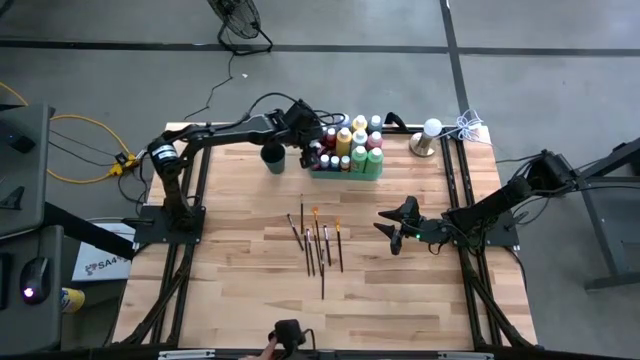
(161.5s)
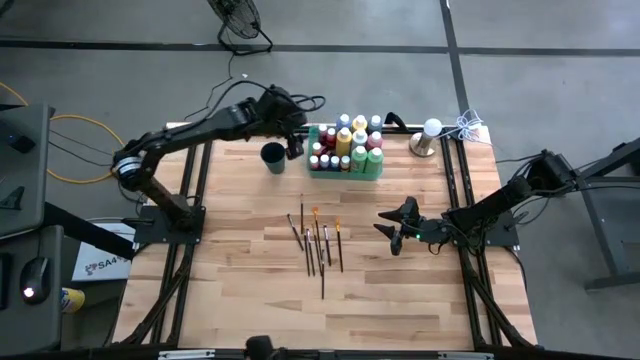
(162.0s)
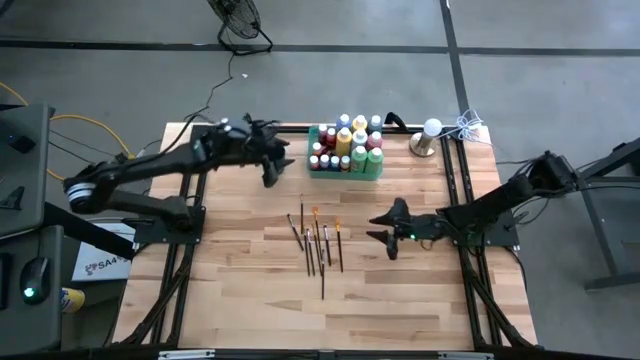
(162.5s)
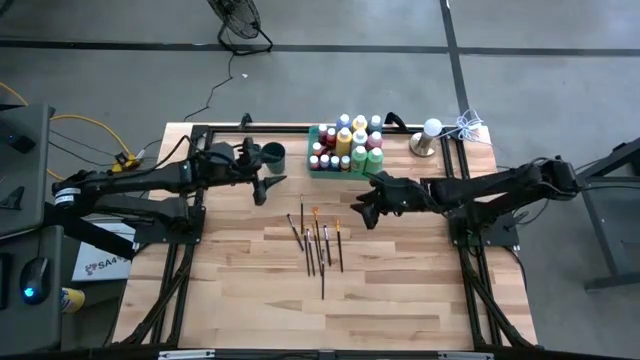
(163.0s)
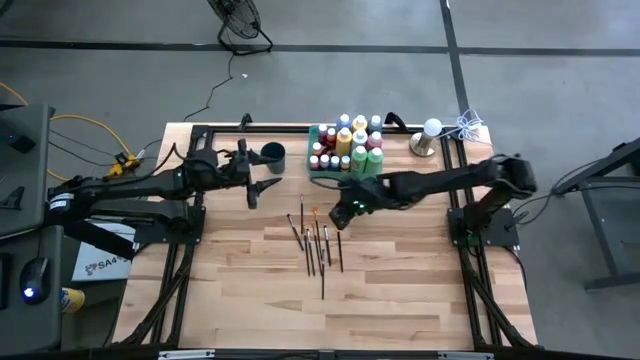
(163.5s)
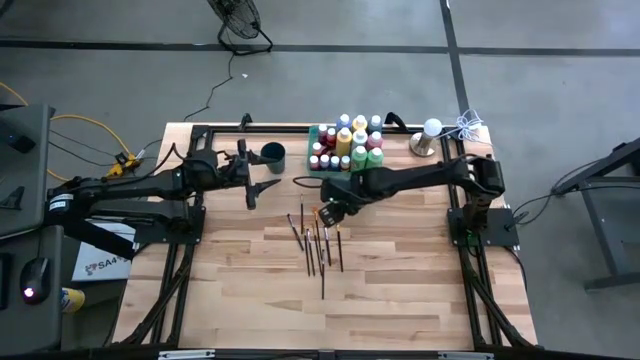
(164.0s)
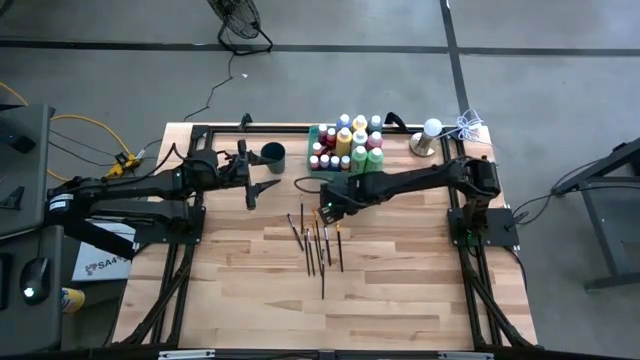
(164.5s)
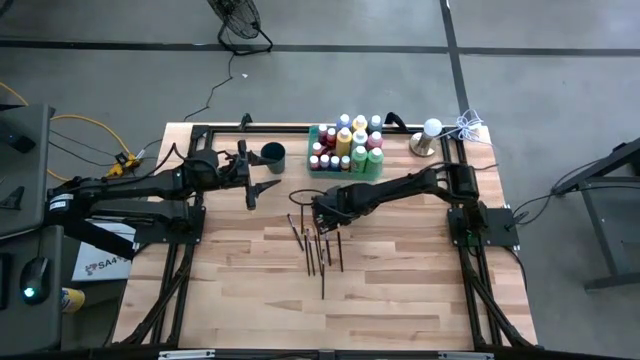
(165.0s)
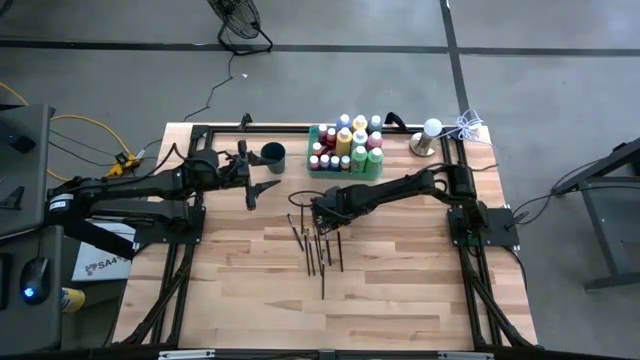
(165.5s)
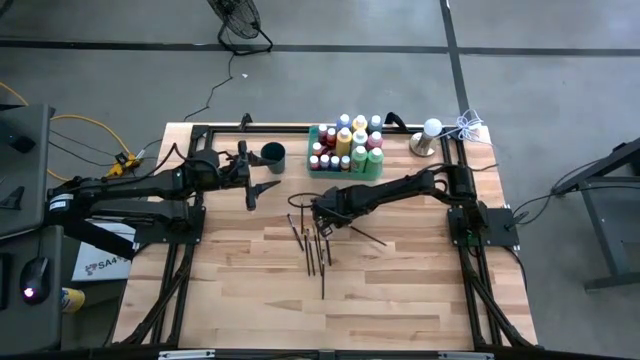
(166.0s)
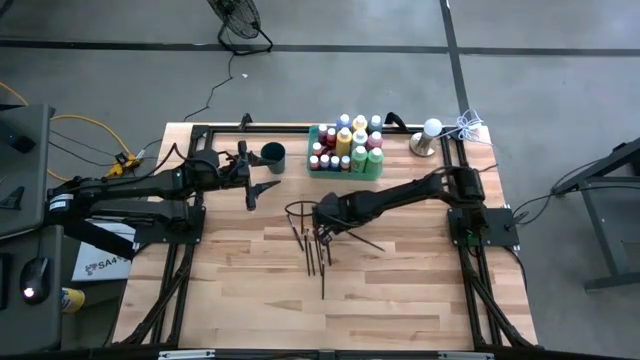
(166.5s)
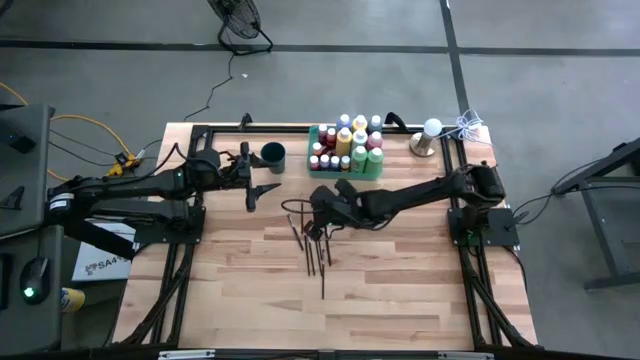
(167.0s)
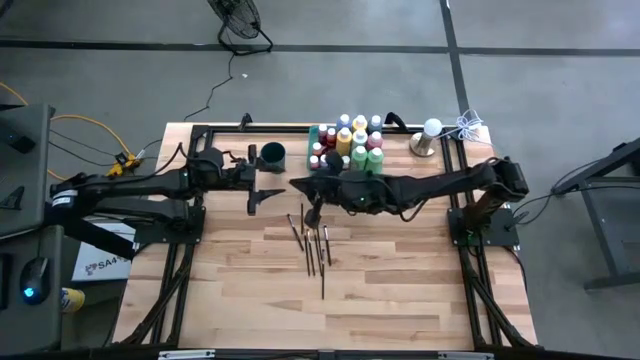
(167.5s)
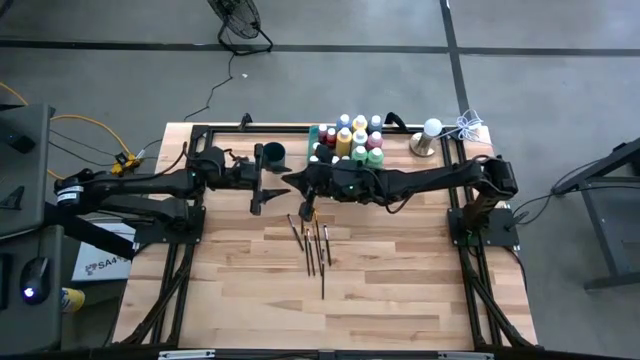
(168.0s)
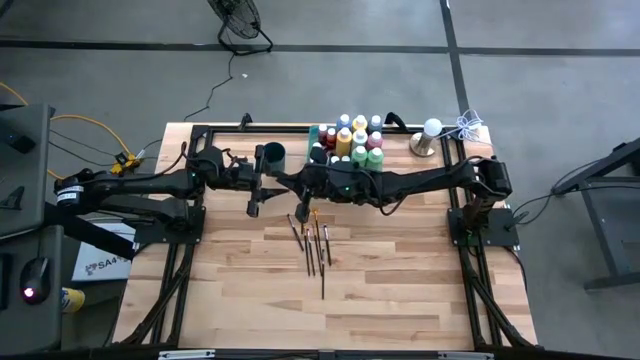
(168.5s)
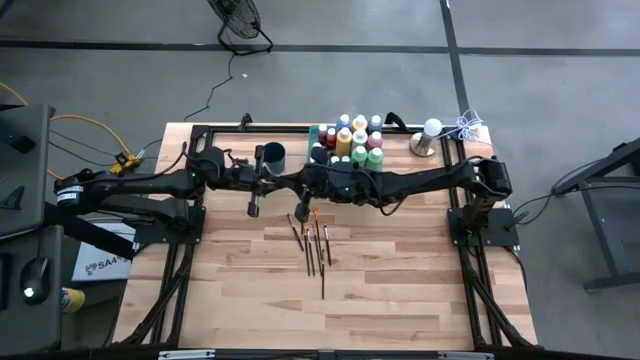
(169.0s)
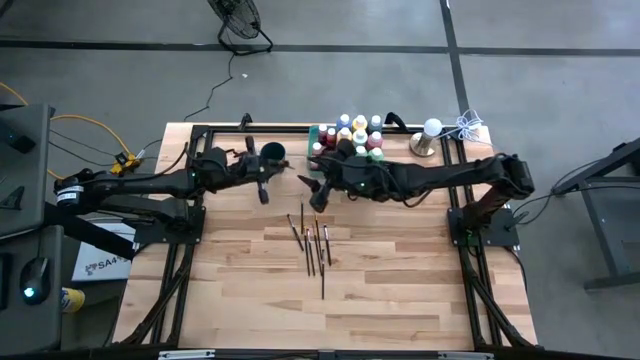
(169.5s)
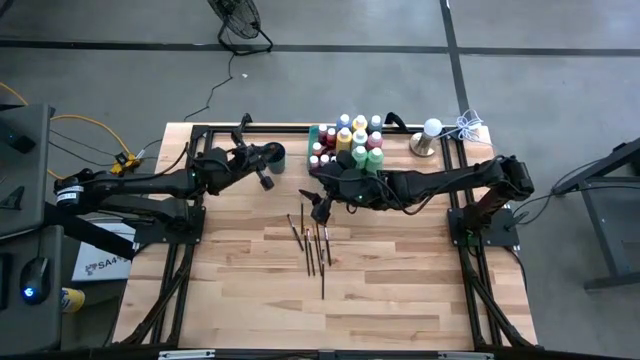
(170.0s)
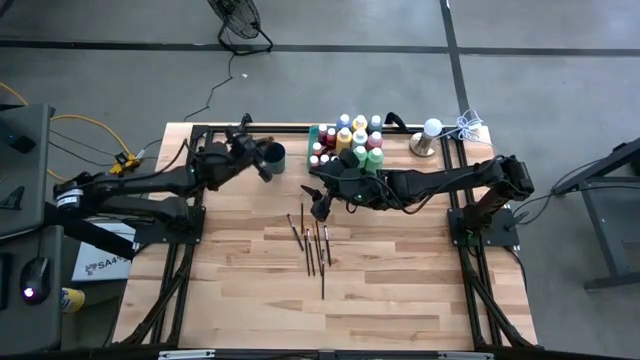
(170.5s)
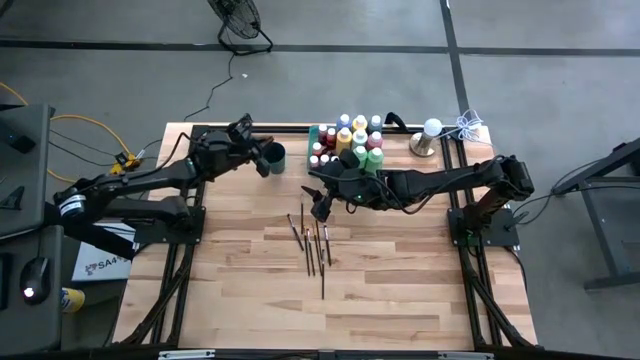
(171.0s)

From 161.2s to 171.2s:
Task: Pick & Place Paint Supplies
Put the gold black paint brush into the blue cup

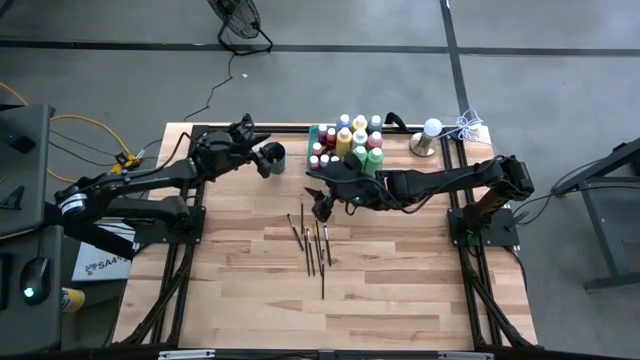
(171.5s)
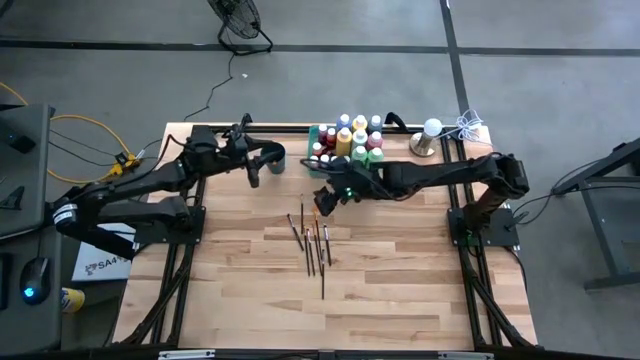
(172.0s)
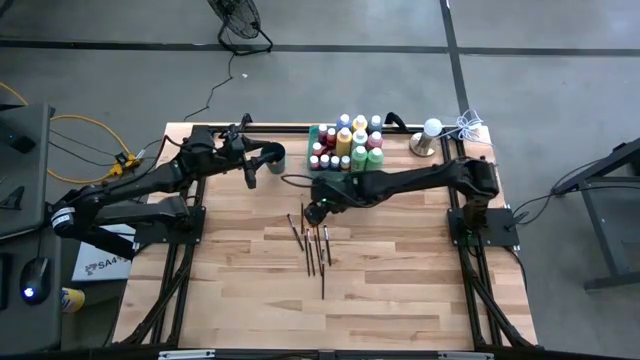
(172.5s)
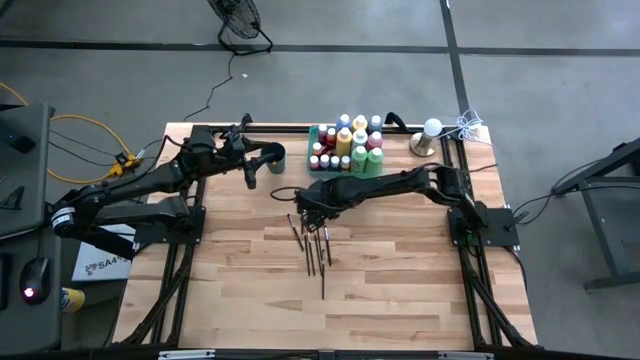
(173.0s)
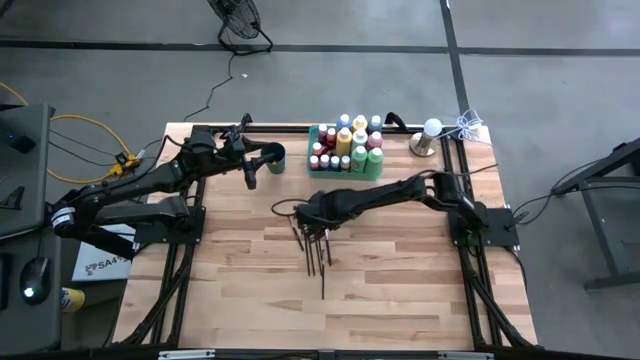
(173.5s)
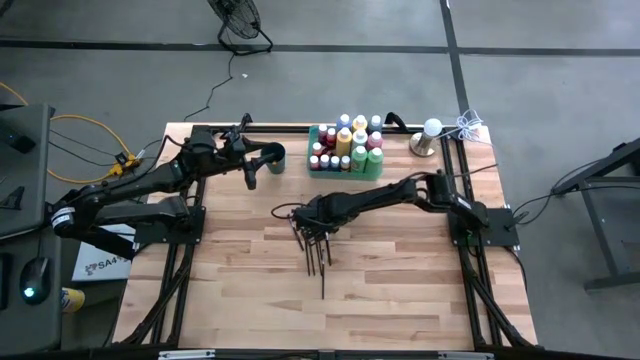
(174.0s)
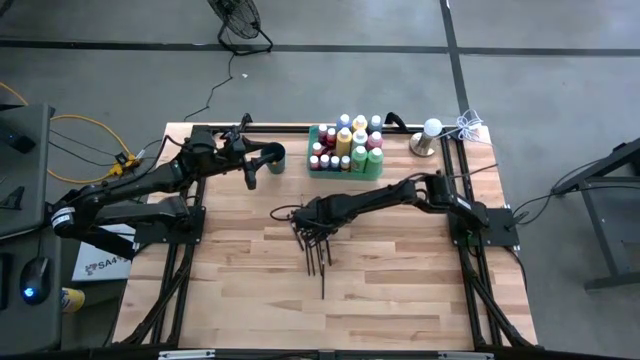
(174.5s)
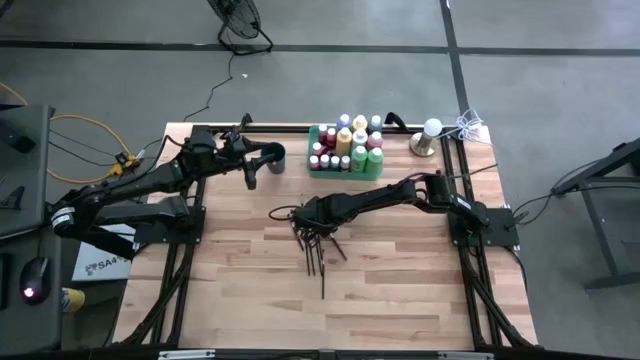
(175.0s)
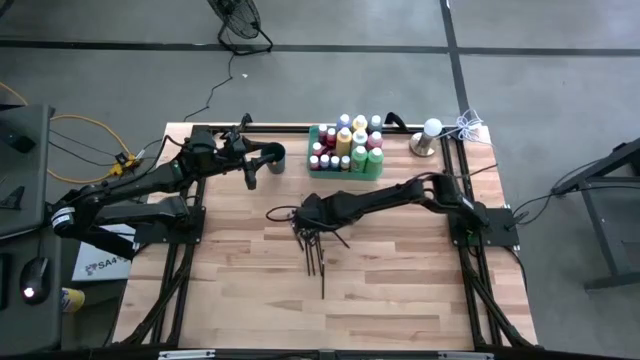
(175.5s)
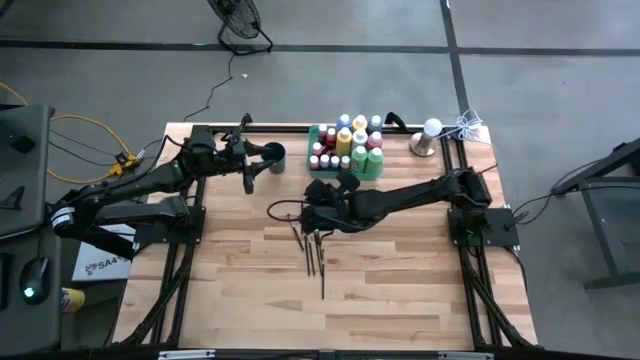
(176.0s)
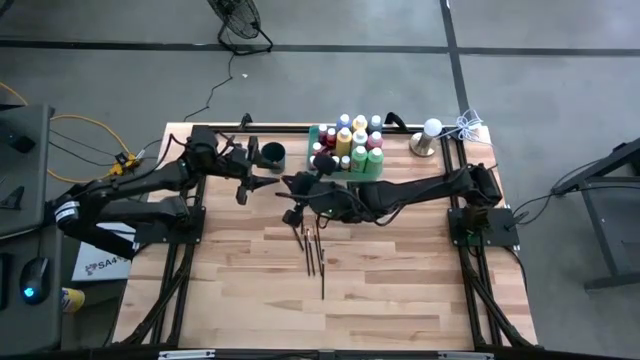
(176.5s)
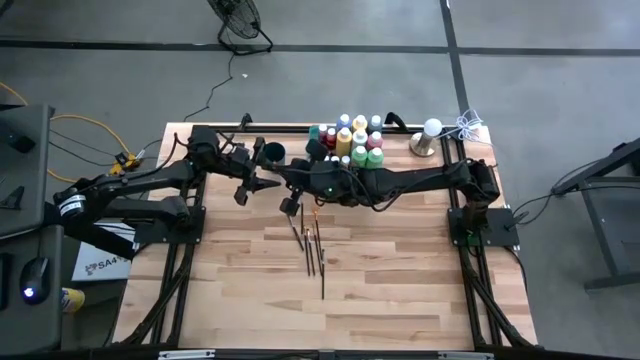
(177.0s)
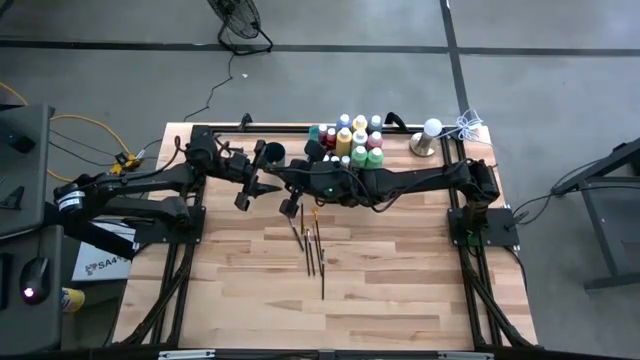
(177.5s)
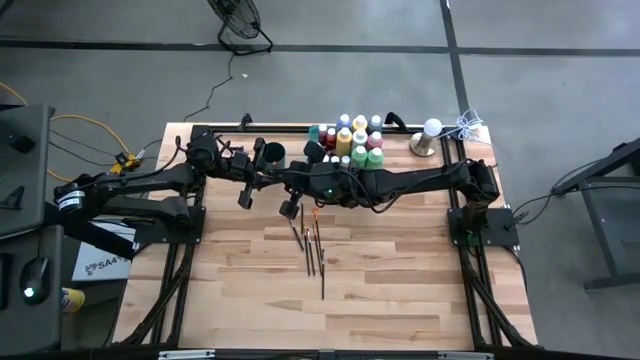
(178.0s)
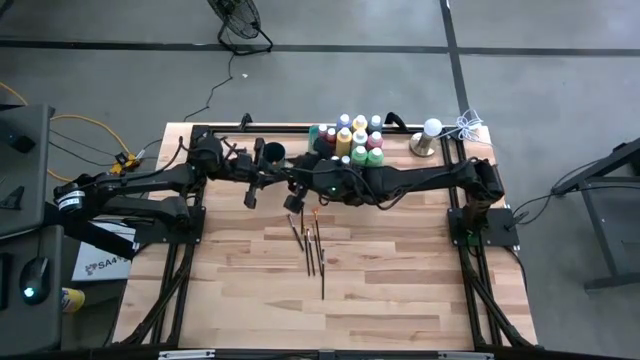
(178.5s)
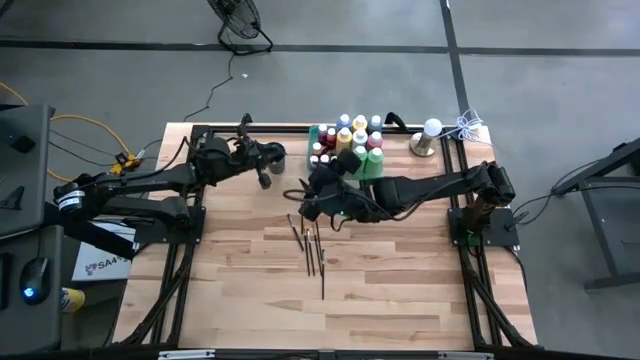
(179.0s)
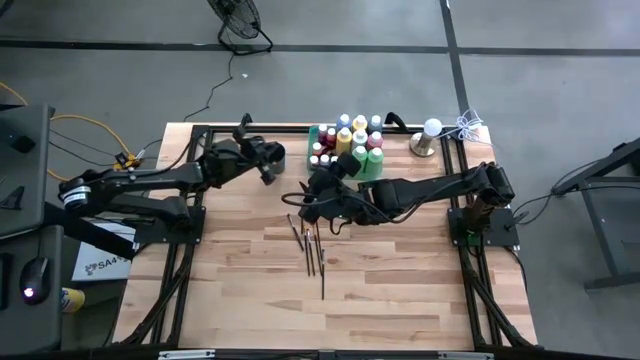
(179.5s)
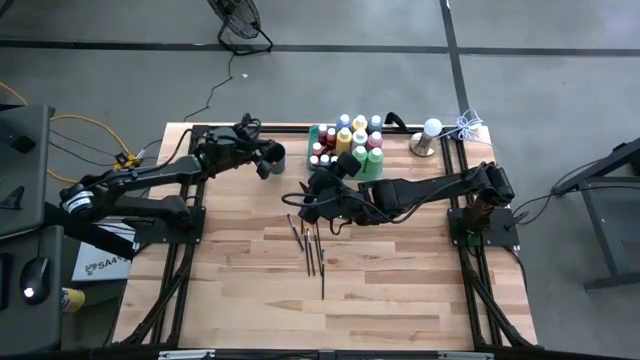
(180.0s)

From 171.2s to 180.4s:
Put the silver black paint brush into the blue cup

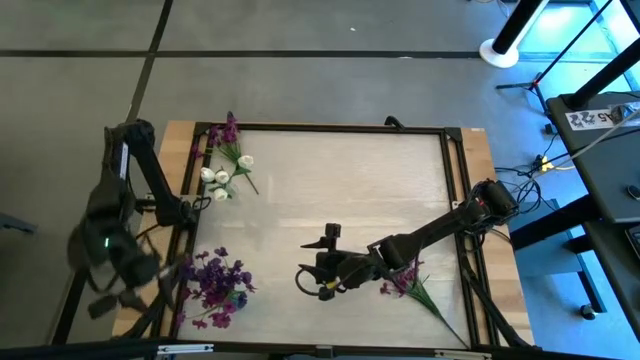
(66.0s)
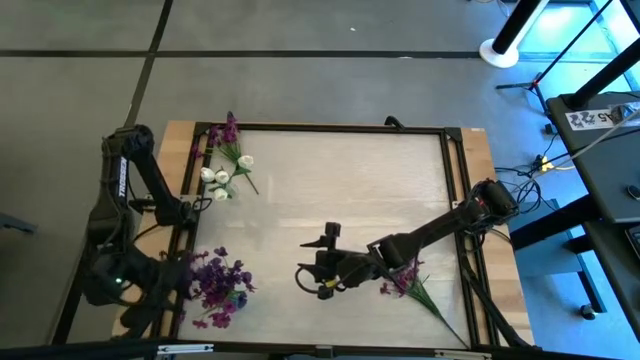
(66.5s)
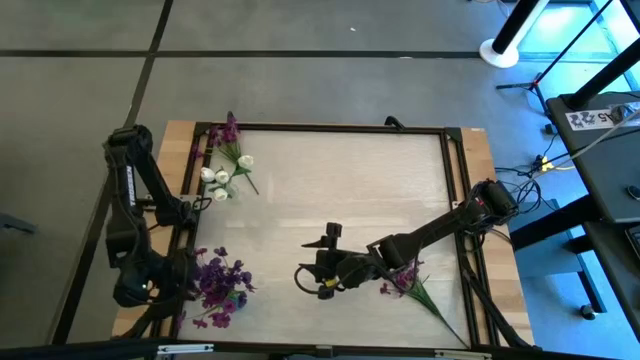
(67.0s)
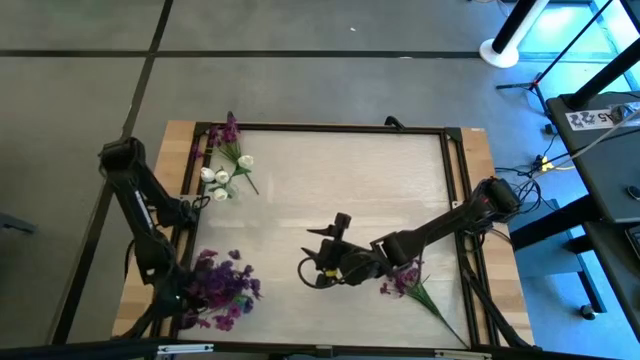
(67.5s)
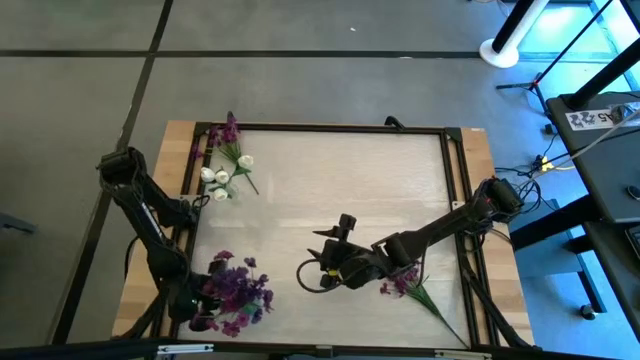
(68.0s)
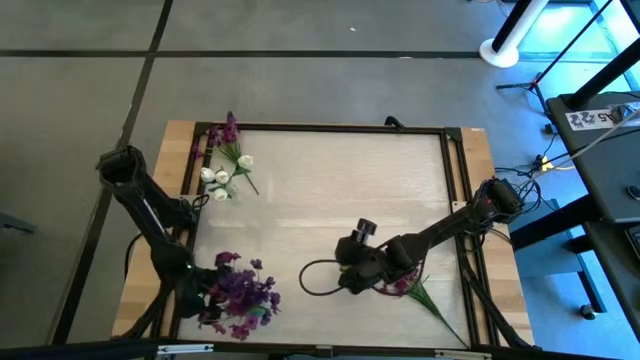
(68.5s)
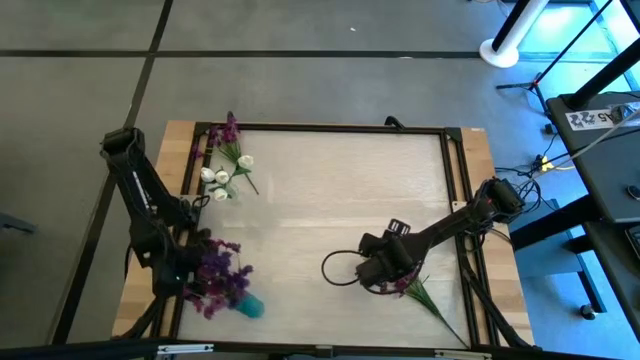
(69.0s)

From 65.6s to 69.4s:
Task: Sort flowers into vase by color
Adjust the transparent blue vase
